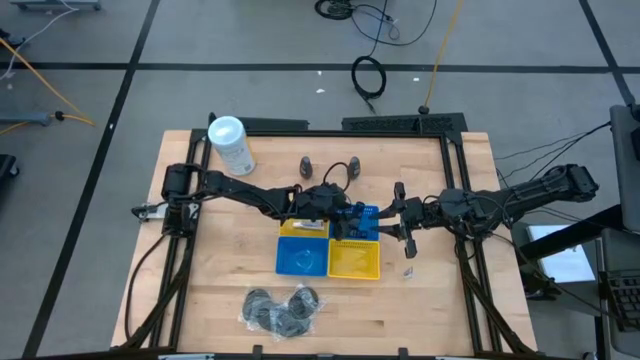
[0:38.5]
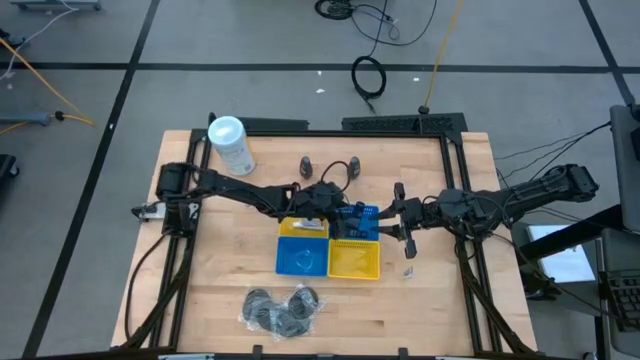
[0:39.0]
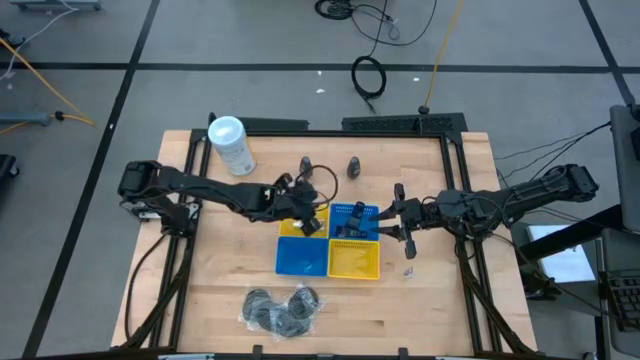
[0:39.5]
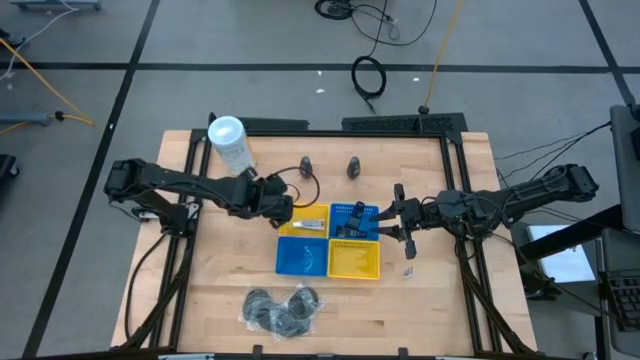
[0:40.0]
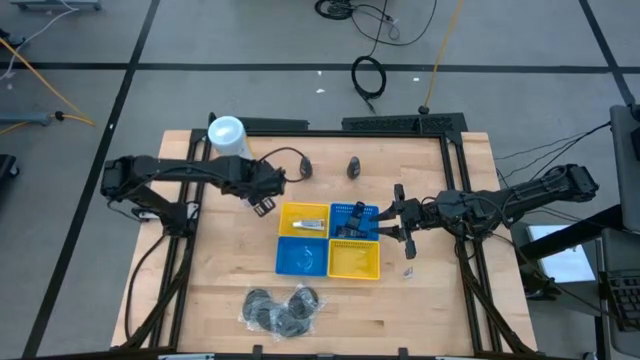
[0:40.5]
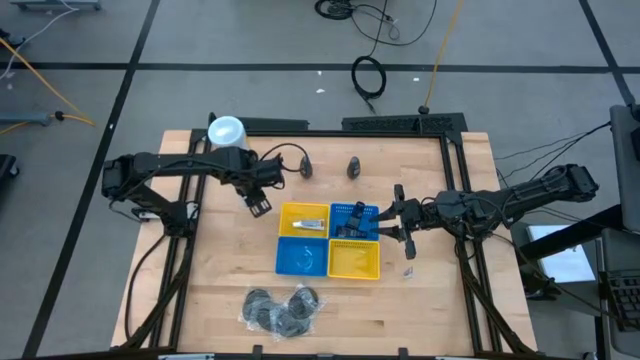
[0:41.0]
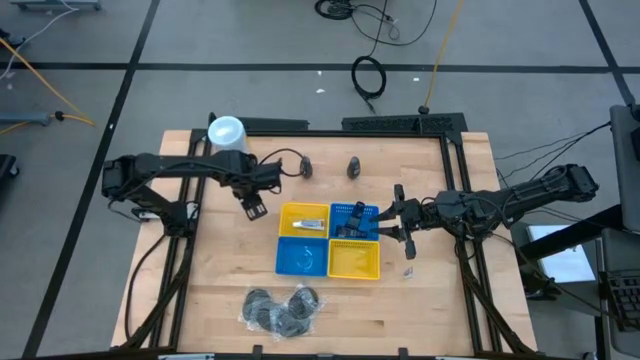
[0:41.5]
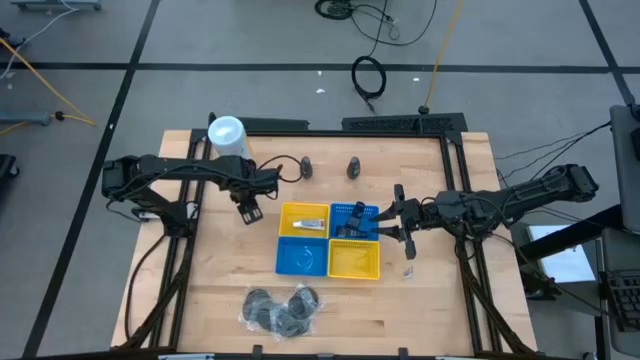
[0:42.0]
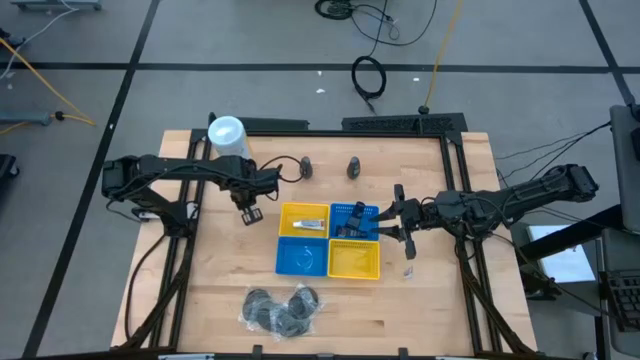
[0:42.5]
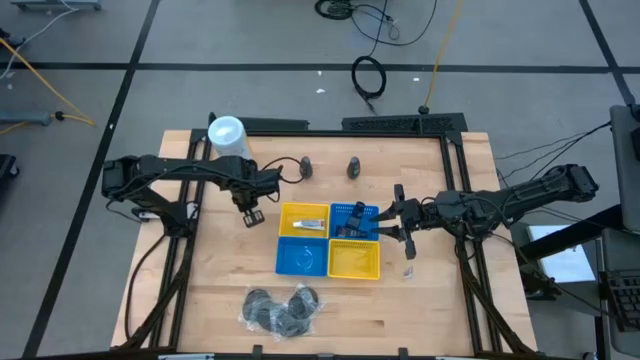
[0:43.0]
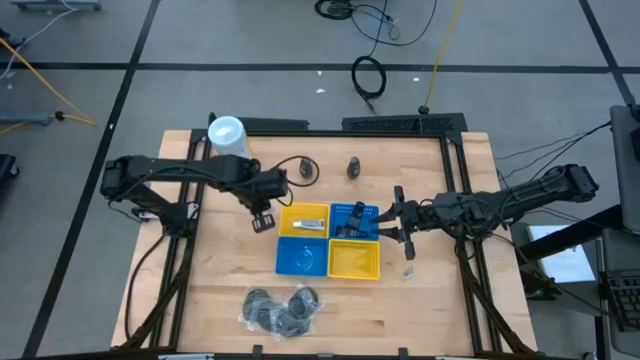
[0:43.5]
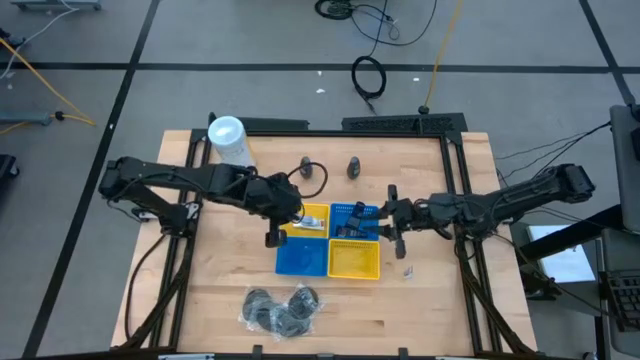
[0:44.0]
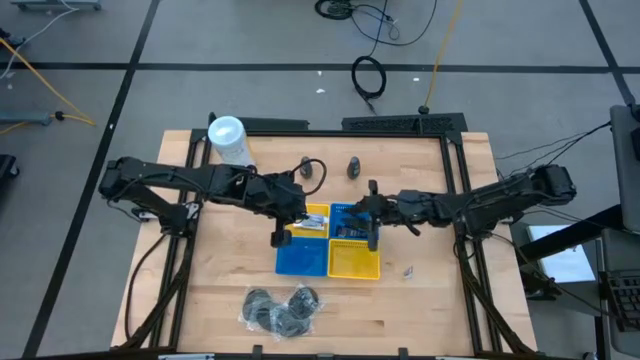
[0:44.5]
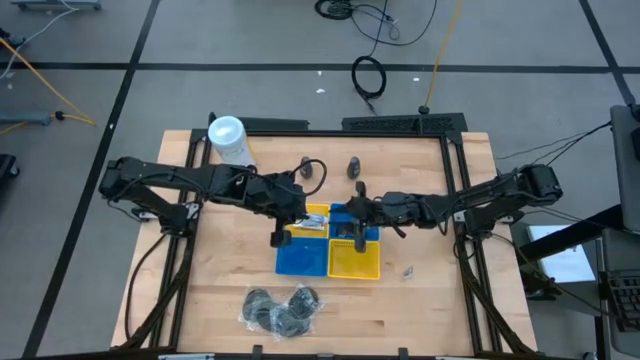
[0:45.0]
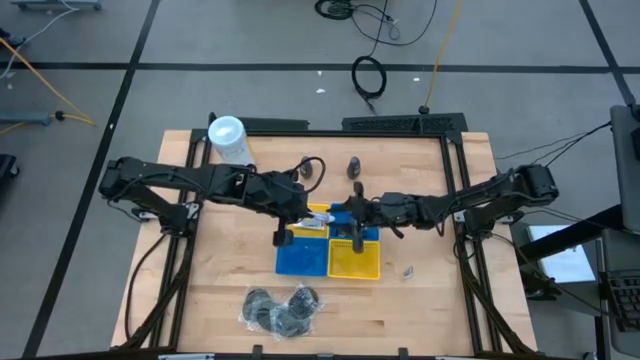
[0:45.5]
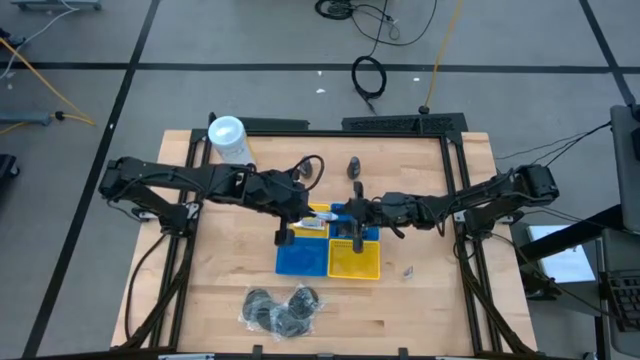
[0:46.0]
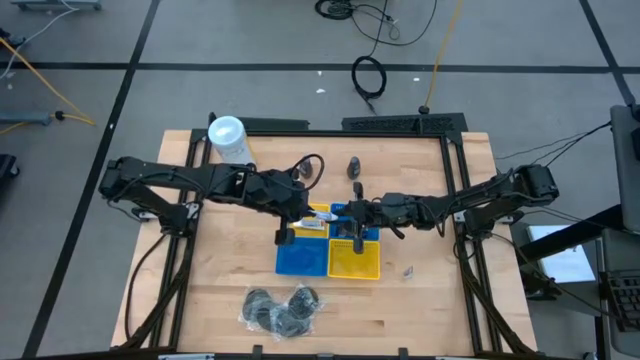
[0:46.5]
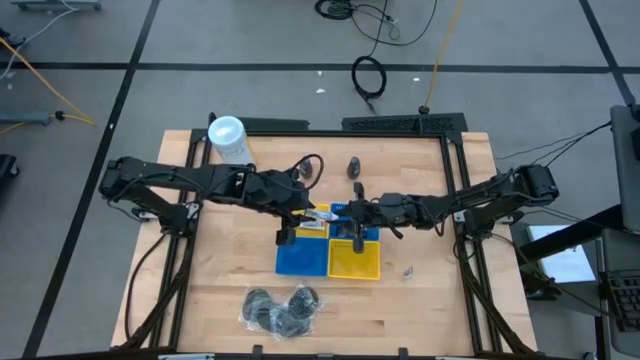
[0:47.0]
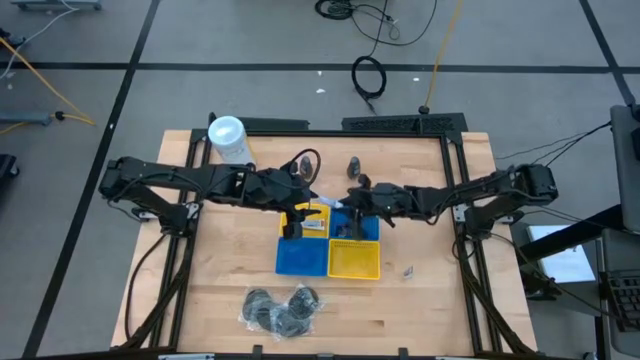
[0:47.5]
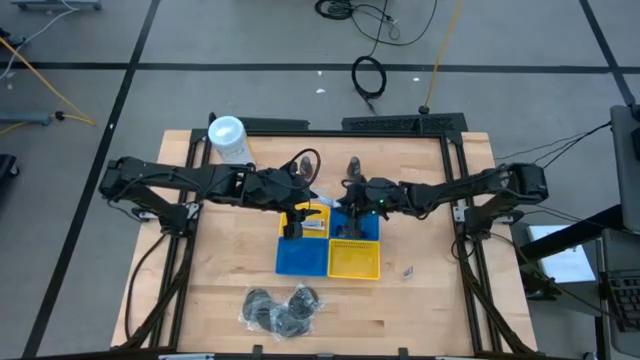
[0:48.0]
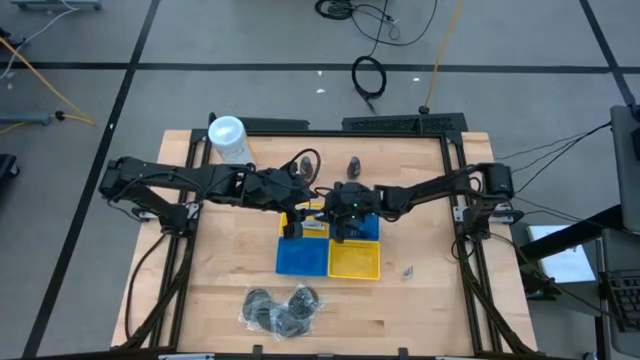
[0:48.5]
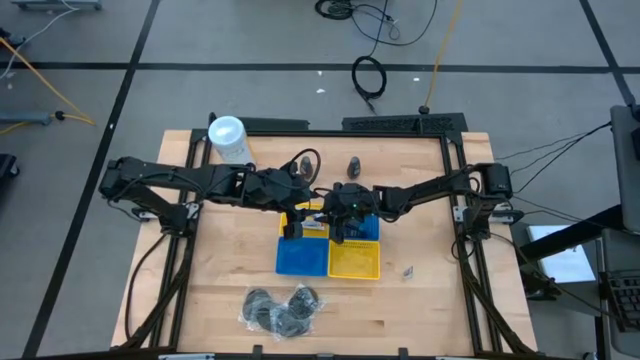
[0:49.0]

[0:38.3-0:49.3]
Task: Pick & Place Travel size toiletries
Put the white toothpaste into the left yellow bin

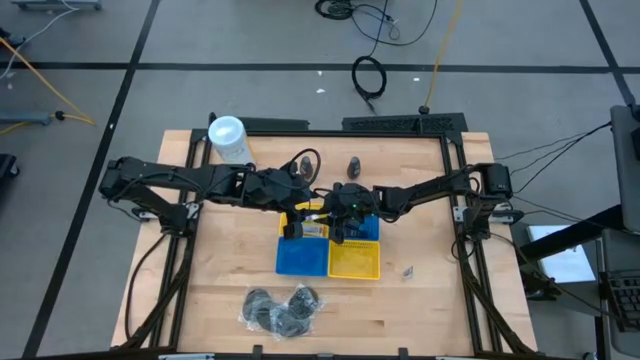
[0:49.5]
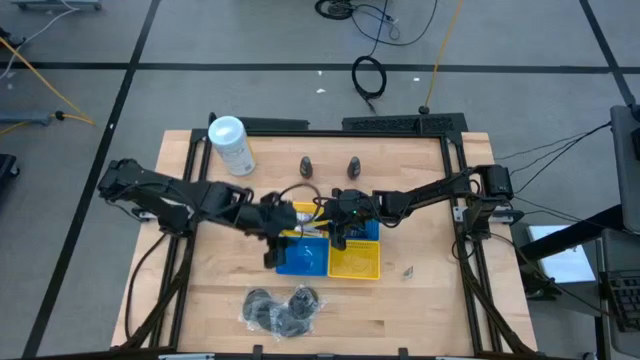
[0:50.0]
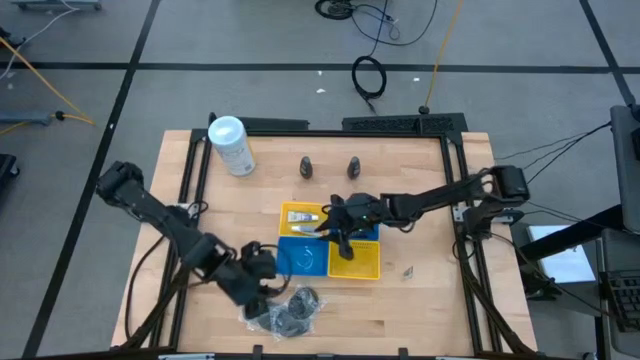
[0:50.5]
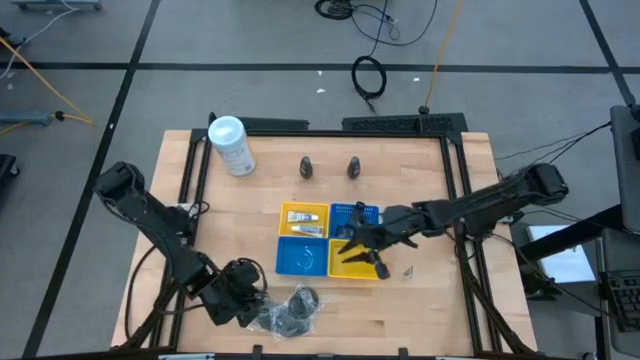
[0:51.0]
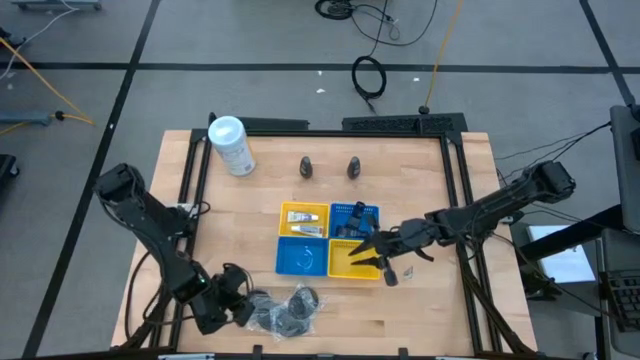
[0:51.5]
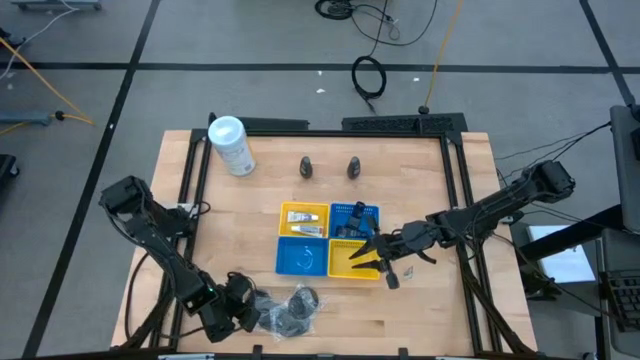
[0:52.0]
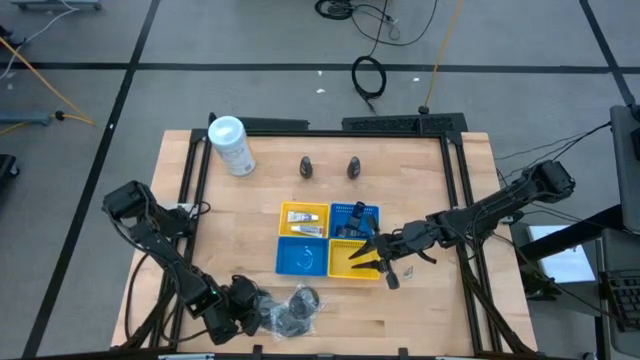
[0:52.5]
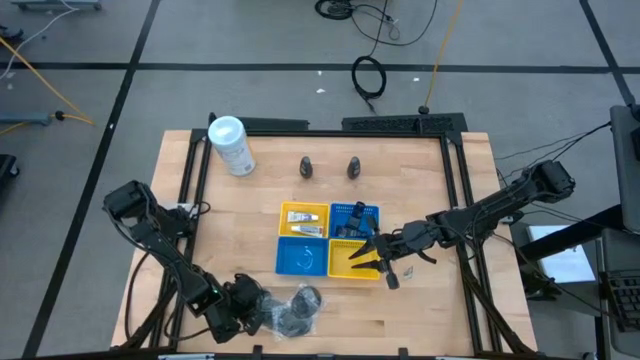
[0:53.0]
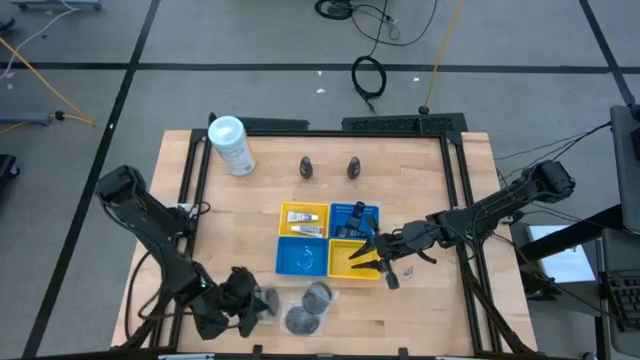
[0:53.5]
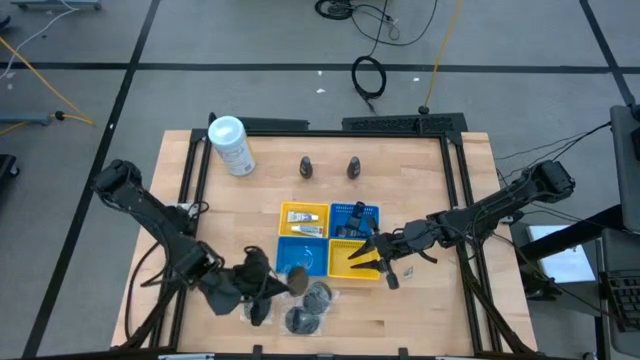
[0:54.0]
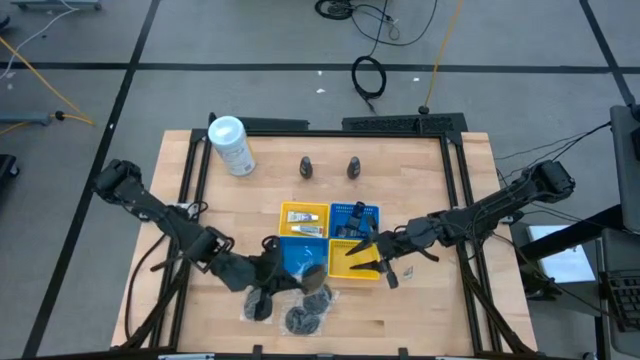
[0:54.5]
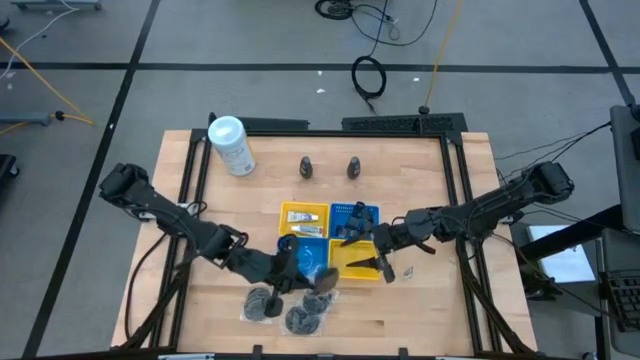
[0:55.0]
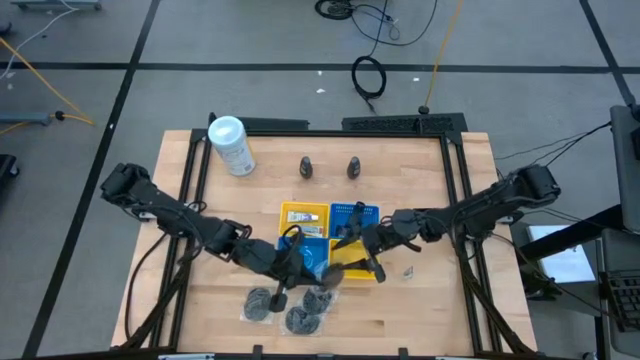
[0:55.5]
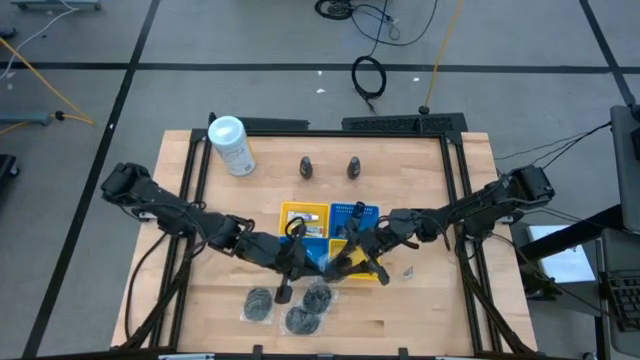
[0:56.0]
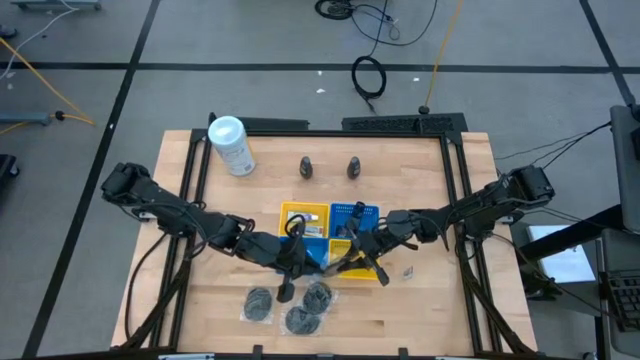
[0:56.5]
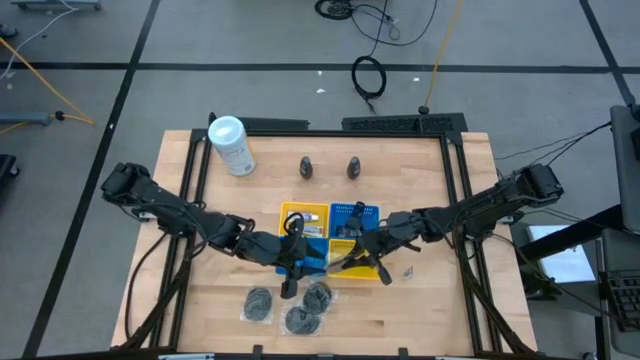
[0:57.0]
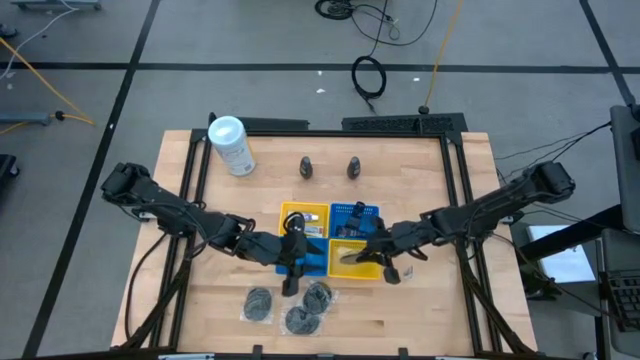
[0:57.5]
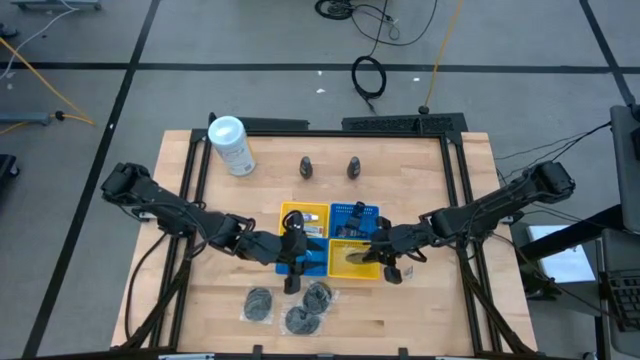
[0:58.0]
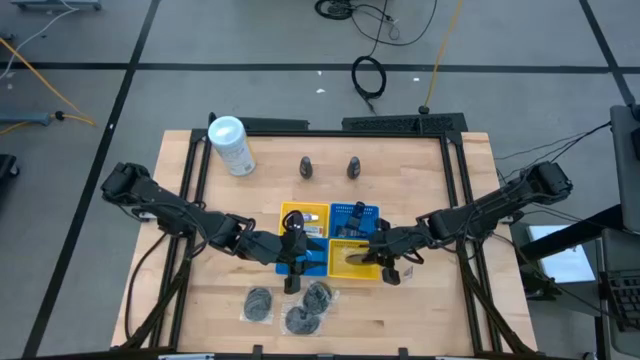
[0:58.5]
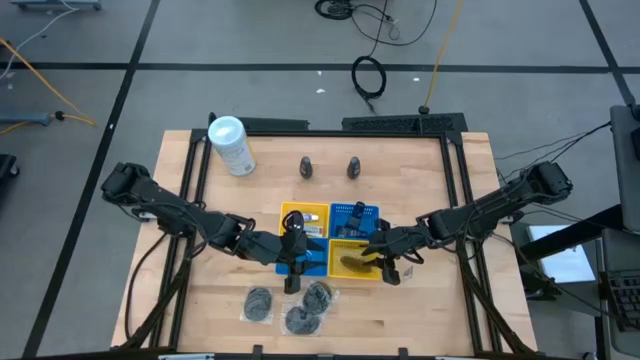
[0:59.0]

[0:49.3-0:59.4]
Put the black hairbrush into the right yellow bin

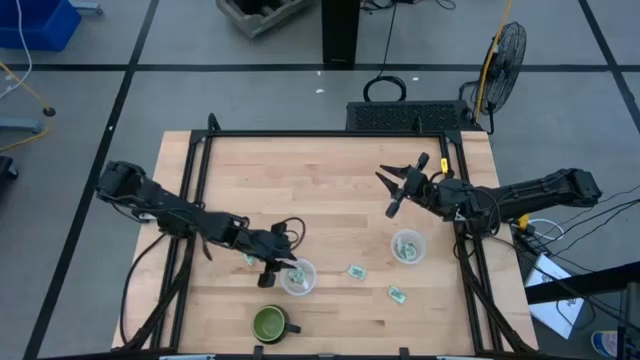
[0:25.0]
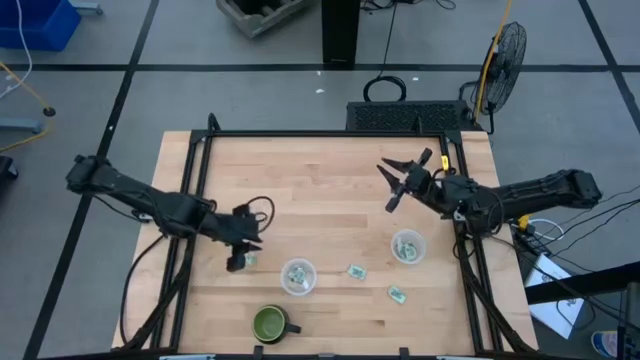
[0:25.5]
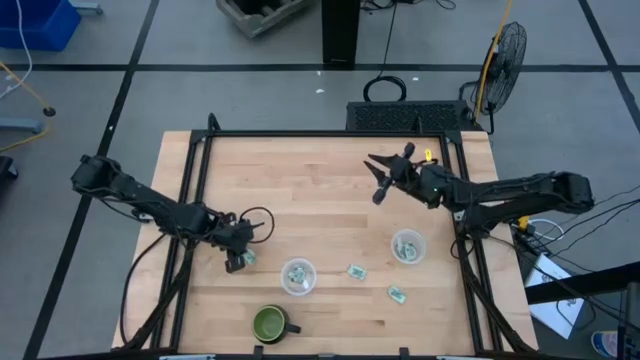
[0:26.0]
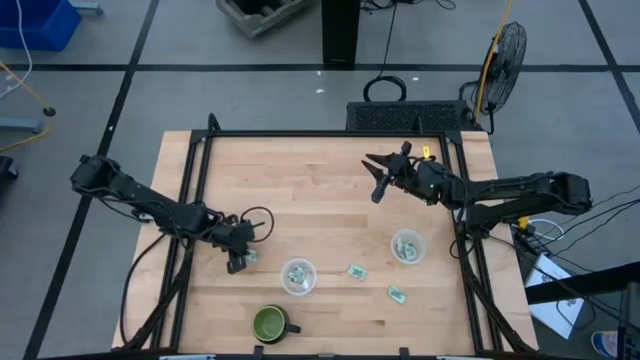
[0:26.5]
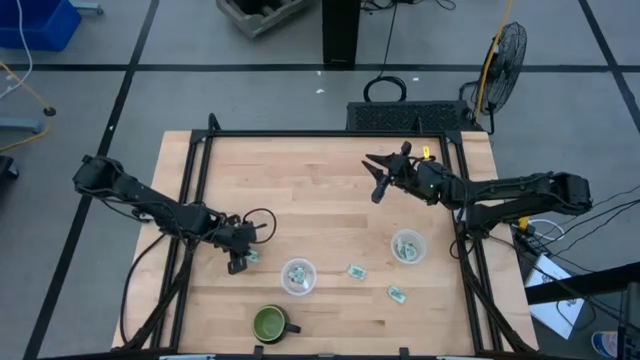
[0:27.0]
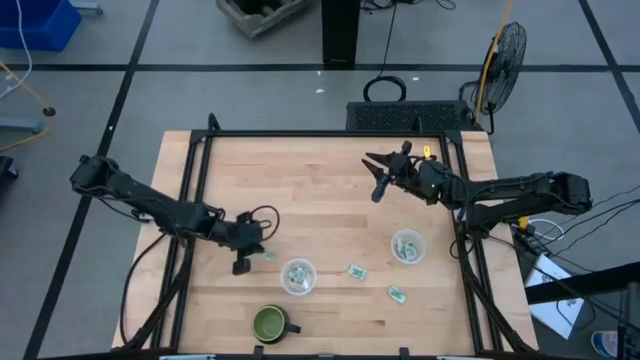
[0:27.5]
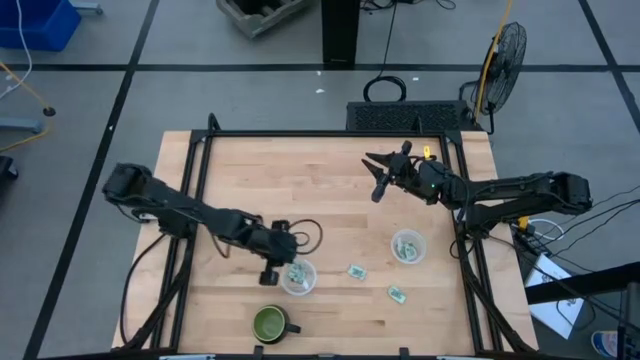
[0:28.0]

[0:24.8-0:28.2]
Task: Pick and place Stevia / Truvia into bins
Put the white stevia packet into the left transparent container
